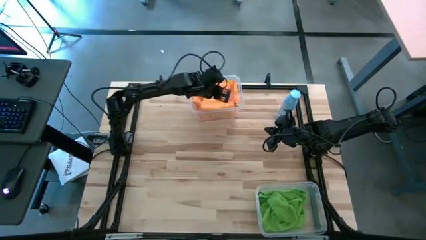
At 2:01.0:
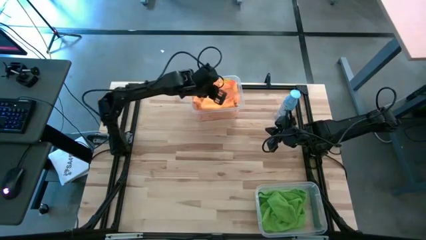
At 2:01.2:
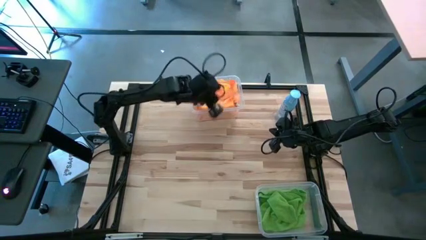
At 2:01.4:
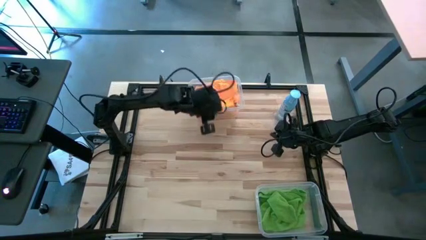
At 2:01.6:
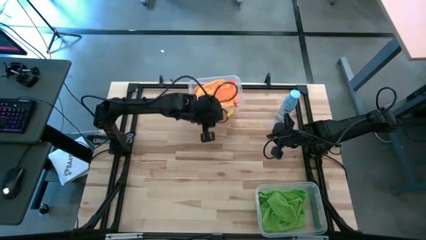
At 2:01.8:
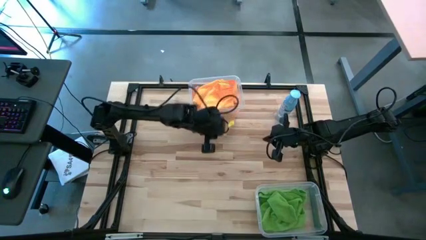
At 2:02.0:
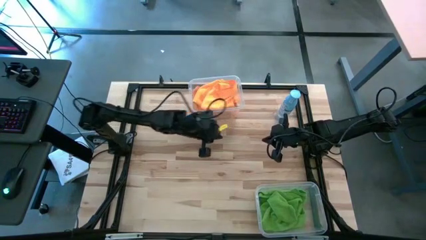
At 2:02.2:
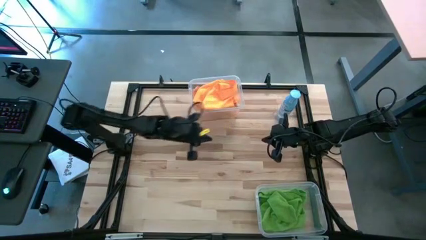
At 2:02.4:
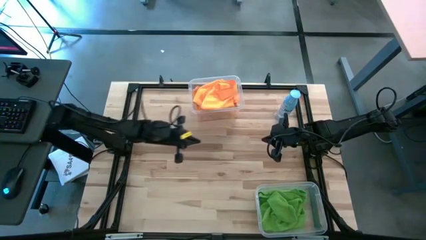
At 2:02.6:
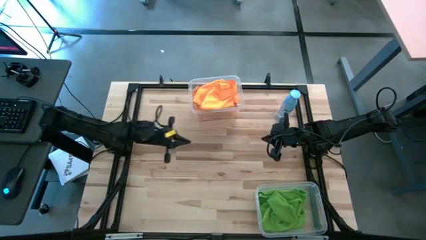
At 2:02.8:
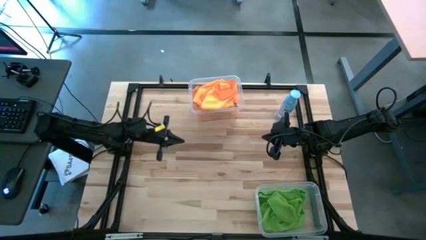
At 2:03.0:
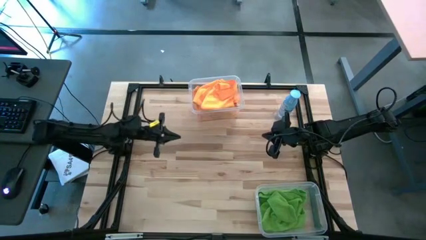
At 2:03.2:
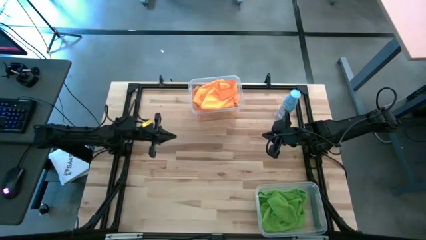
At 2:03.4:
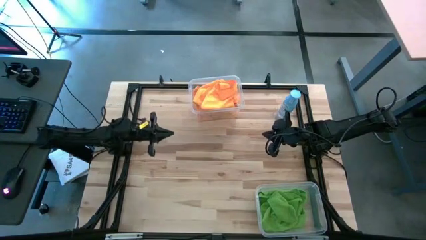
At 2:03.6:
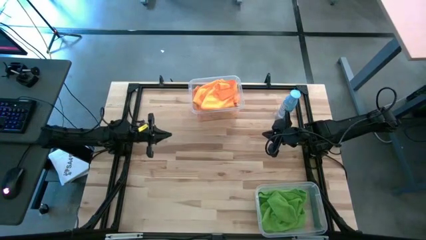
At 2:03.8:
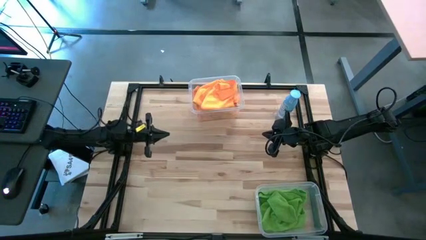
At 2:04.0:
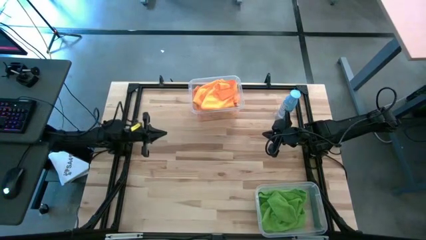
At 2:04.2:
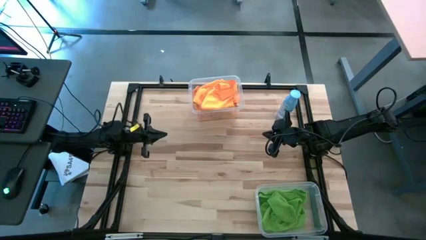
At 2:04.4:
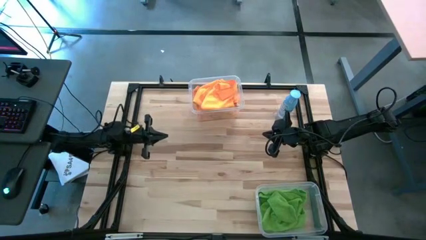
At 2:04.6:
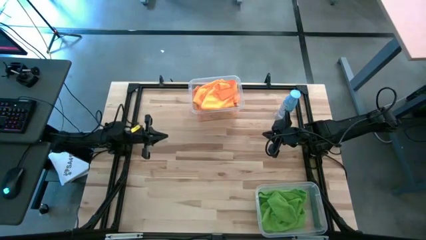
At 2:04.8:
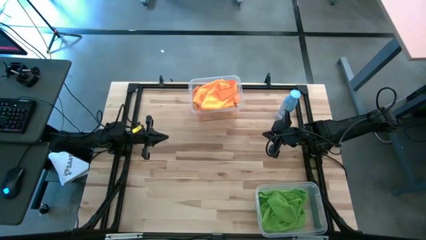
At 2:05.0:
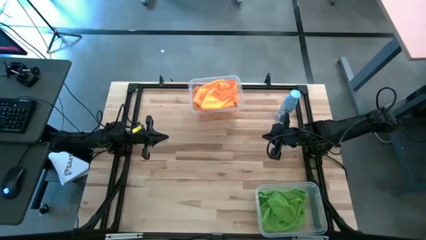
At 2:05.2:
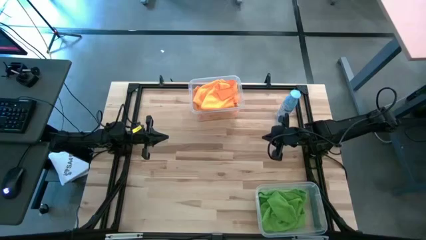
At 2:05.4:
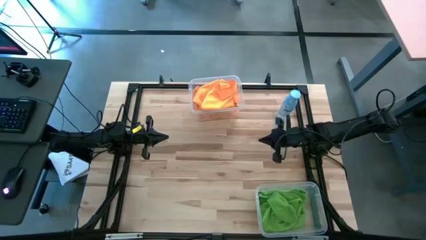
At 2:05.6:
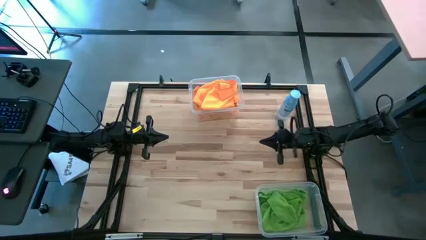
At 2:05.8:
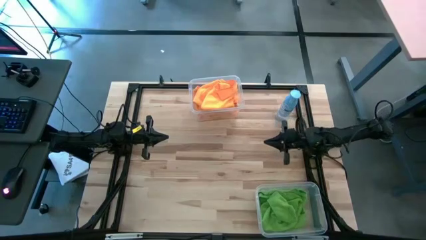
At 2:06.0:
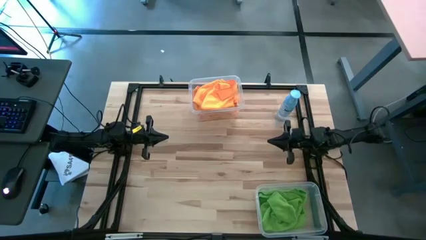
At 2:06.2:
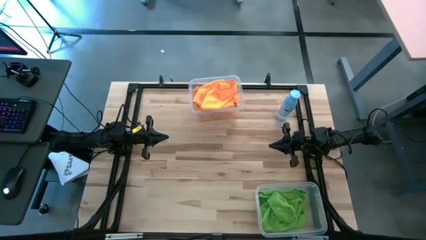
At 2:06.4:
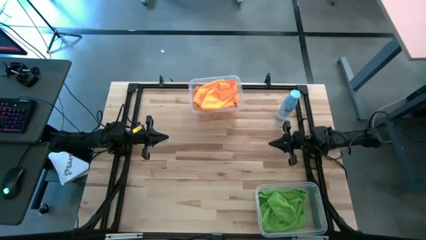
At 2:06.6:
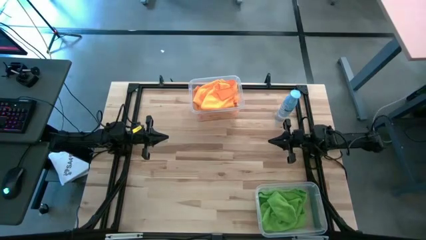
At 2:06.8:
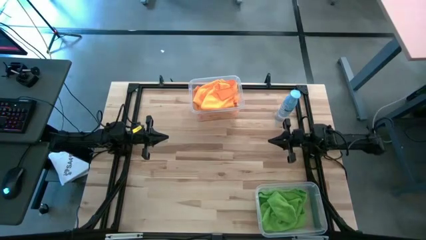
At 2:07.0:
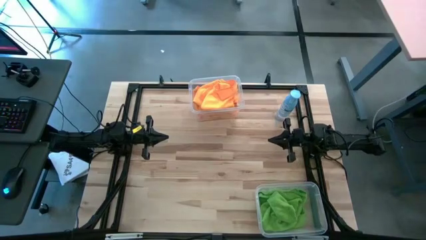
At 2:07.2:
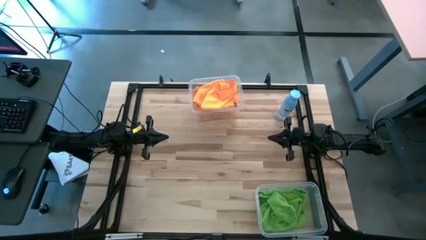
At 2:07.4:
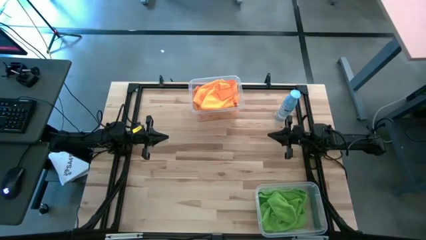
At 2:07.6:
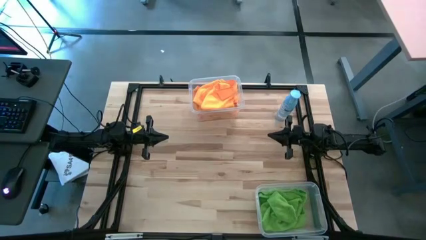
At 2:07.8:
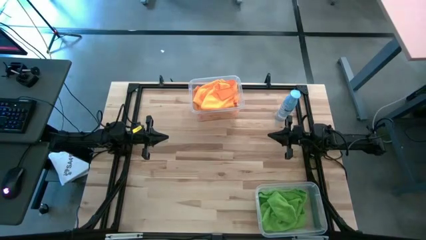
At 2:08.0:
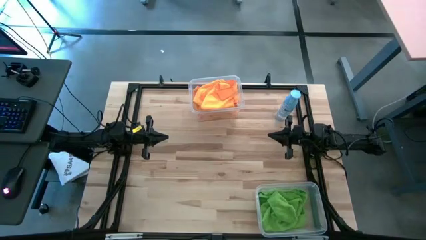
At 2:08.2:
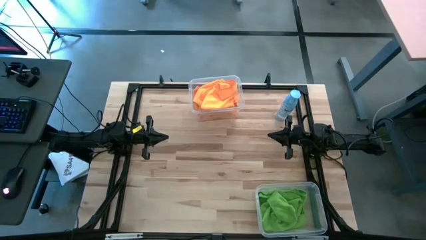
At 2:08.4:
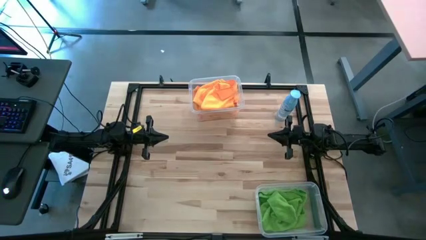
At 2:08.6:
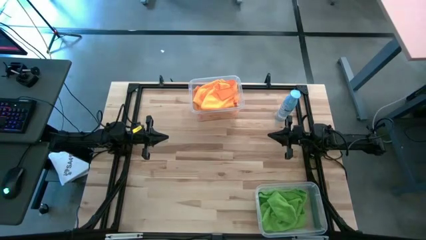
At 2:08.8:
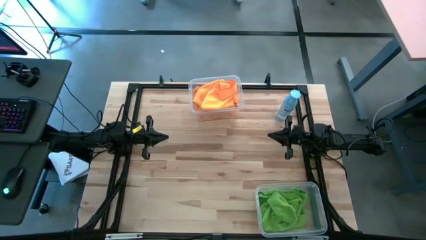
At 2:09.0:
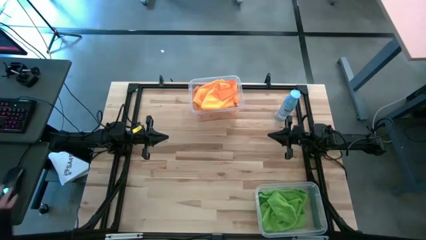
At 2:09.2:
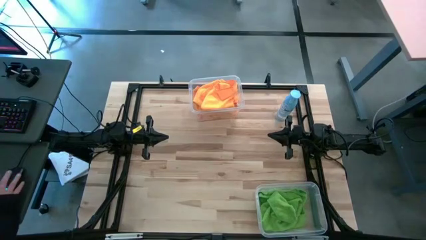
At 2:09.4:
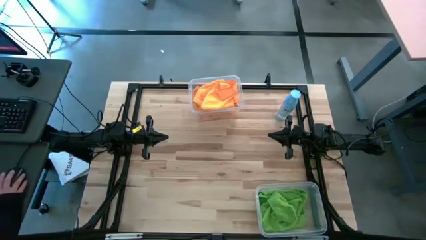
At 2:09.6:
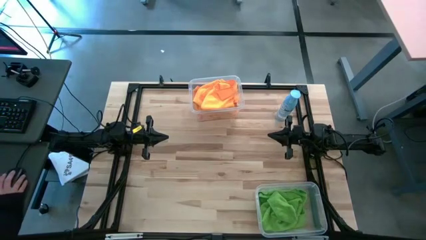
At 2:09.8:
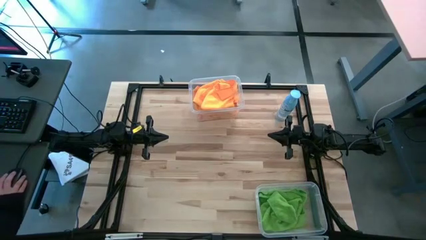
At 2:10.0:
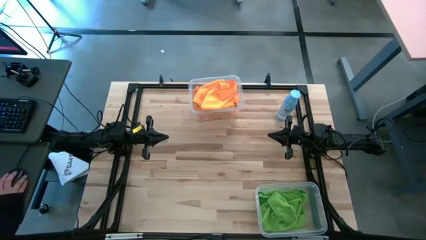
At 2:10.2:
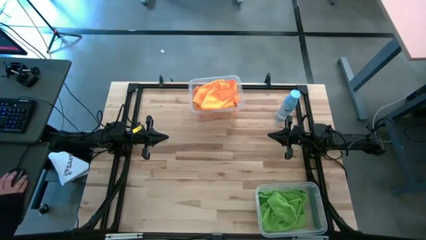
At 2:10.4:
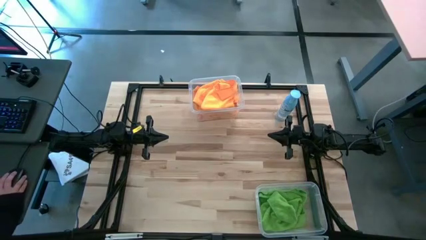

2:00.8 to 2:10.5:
Task: Sort microfiber towel by color & place in baskets
Return to Home Position

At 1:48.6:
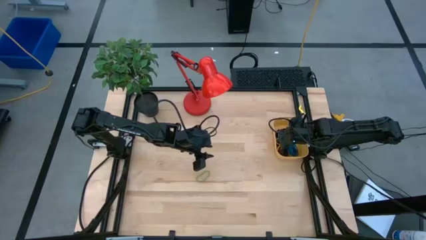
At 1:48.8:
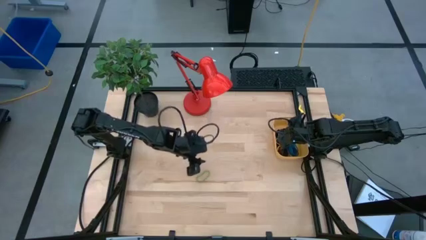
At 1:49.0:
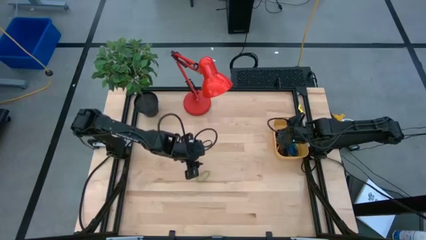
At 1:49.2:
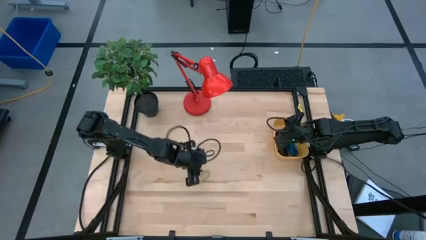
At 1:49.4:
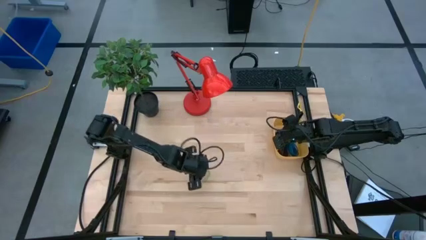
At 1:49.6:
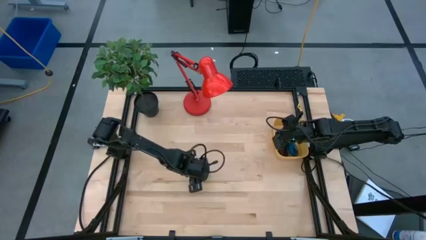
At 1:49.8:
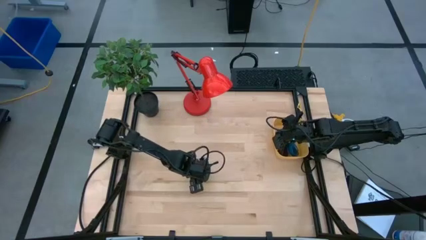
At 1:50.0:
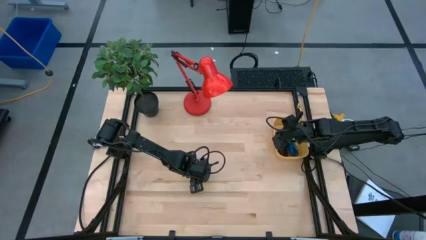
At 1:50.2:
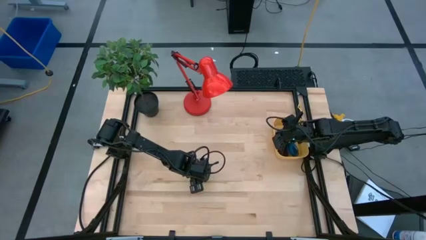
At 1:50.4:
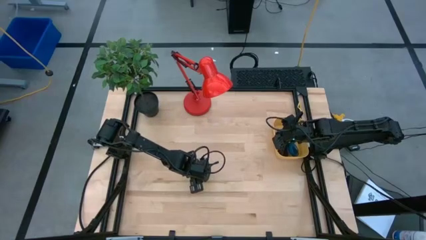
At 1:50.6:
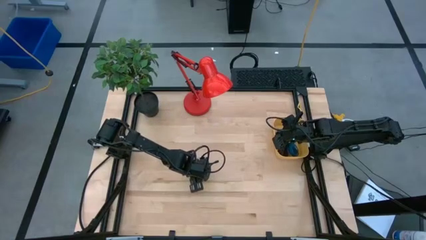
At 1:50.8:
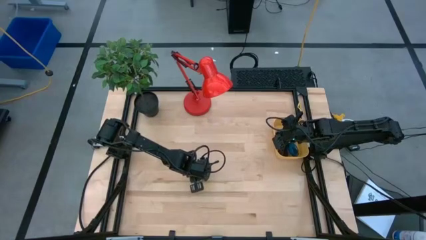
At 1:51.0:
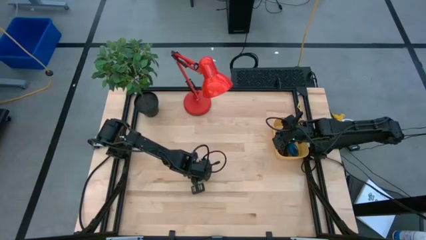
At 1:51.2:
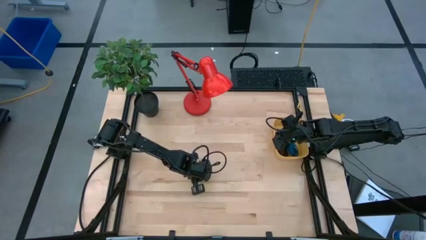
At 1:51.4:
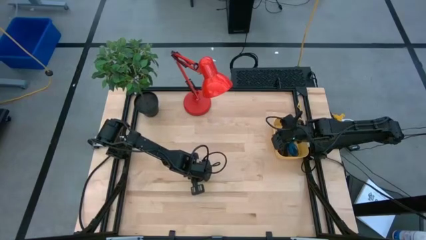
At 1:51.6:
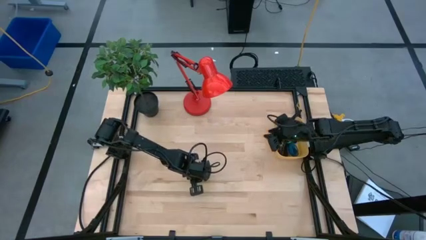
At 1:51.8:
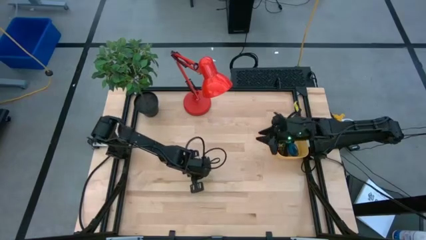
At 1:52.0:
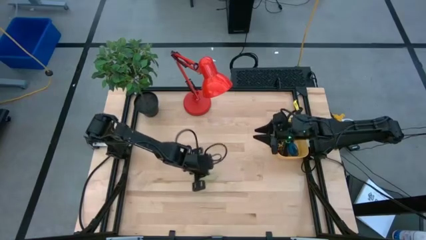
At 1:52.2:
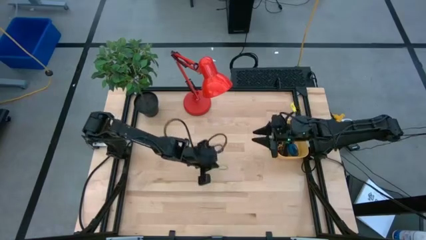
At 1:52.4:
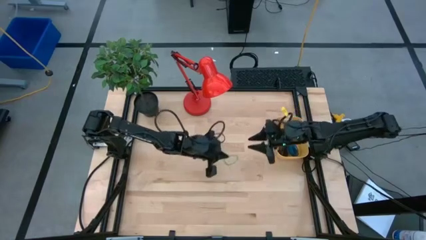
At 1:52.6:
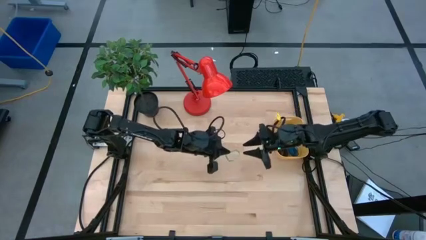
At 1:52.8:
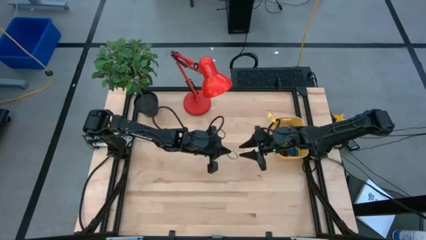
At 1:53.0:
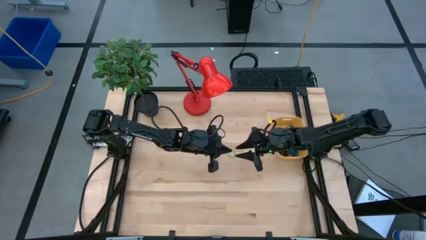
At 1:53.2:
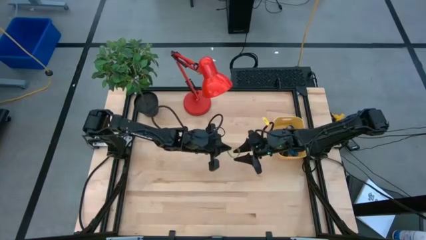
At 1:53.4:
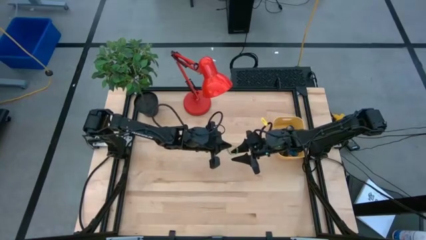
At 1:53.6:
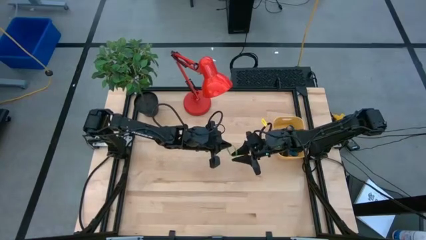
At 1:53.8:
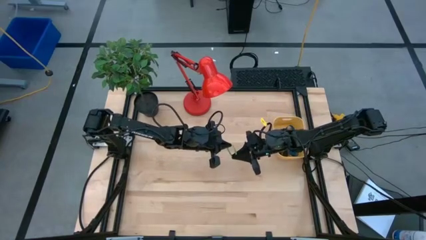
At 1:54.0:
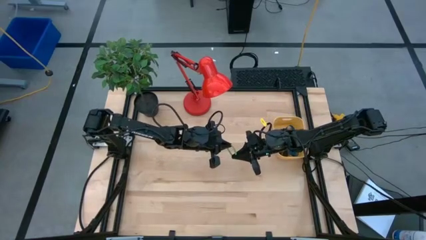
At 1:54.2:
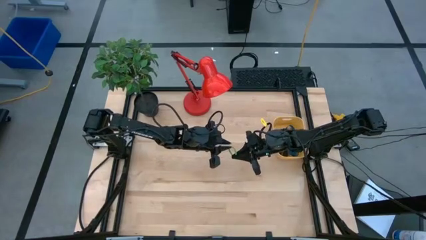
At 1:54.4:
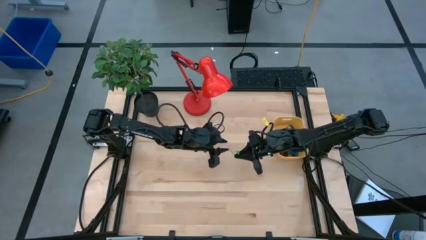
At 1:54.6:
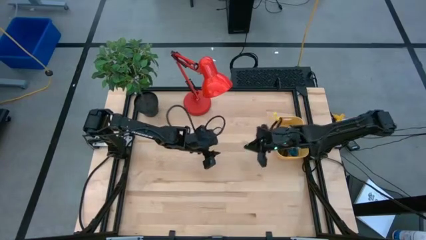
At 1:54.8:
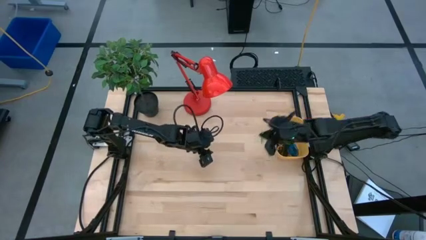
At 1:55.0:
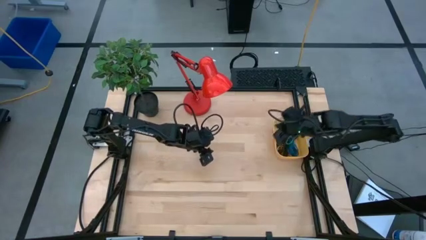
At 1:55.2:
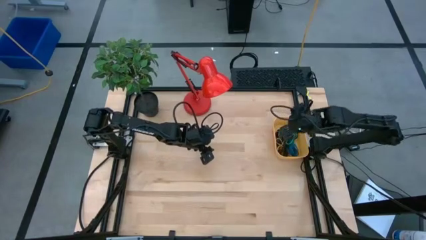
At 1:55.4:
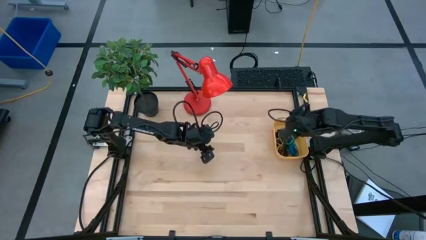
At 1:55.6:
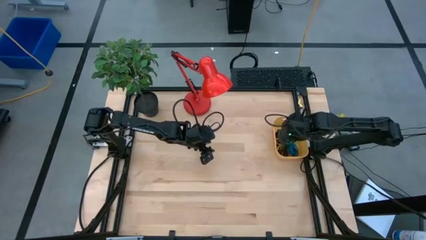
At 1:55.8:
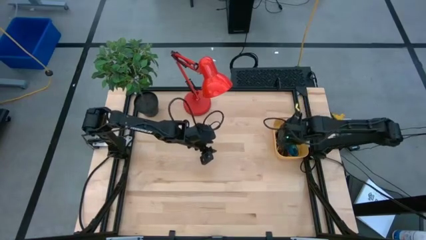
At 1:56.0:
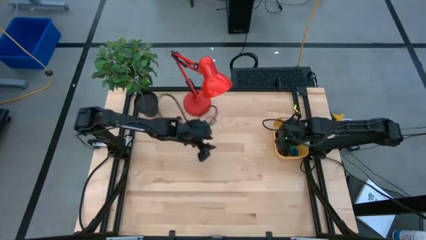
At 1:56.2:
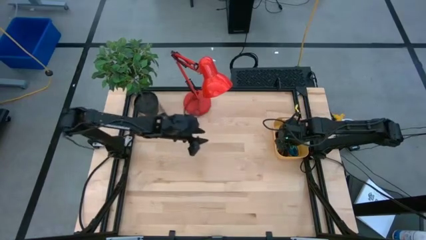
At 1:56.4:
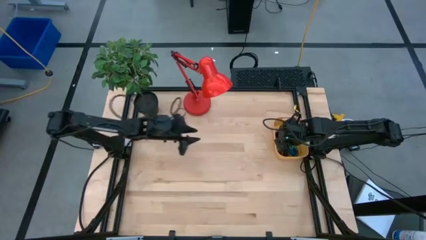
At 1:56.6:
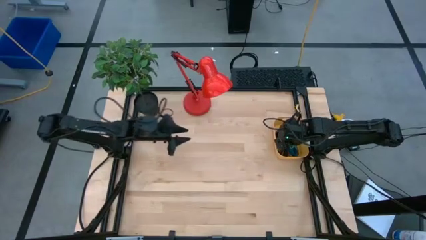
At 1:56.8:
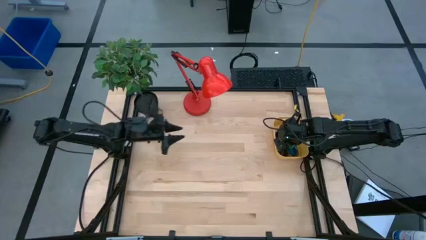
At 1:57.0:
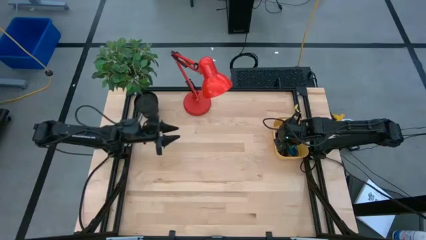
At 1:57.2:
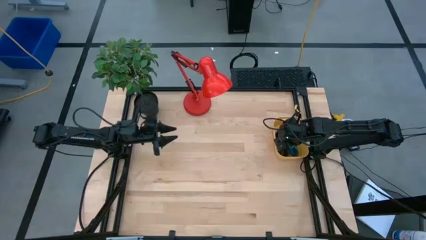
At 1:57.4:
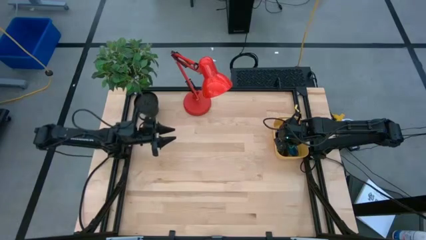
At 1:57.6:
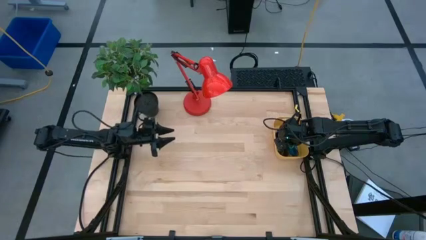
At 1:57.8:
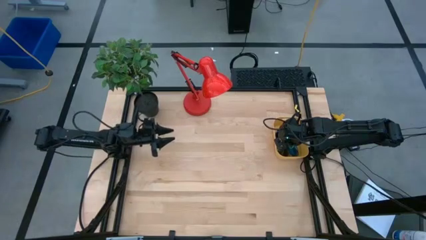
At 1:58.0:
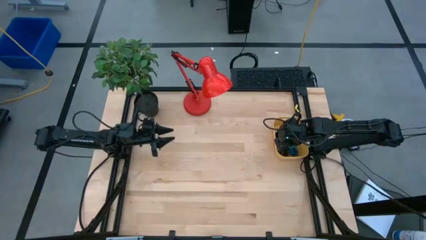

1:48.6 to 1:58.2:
Task: Pick and place rubber bands into bin
Put the green rubber band into the yellow bin
